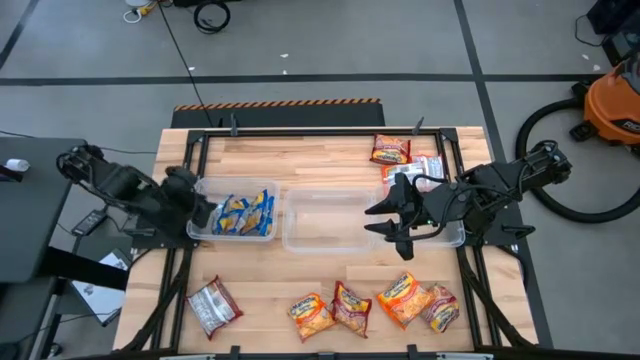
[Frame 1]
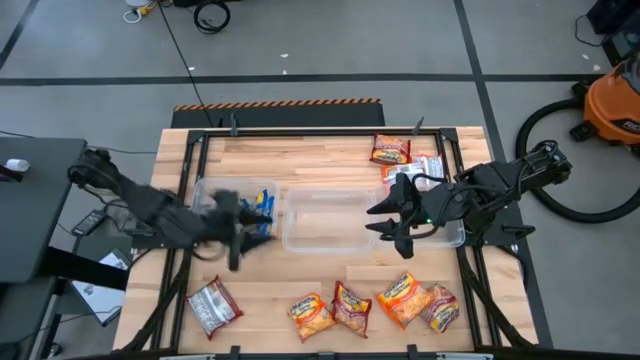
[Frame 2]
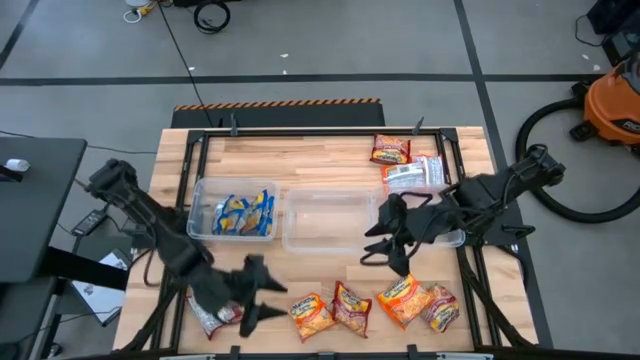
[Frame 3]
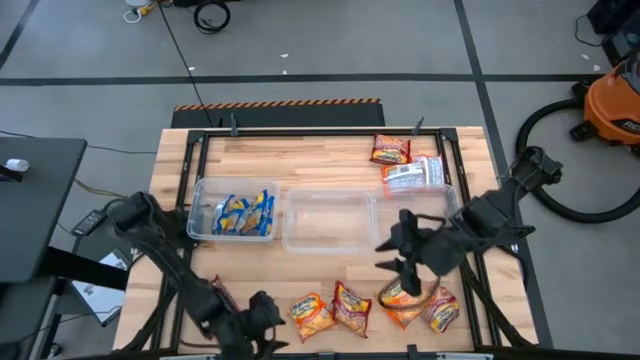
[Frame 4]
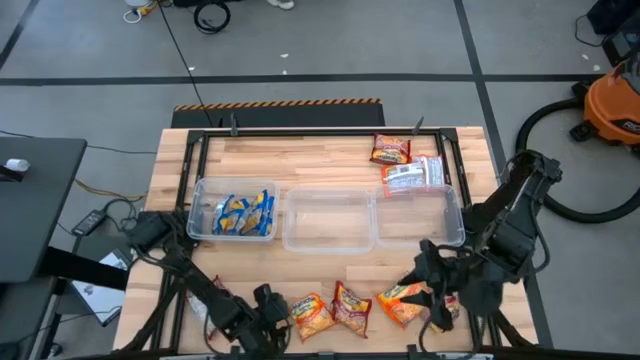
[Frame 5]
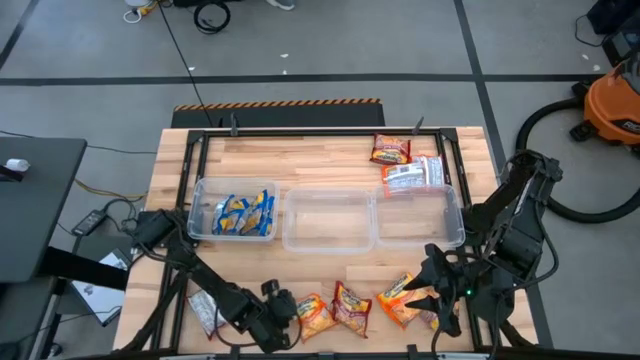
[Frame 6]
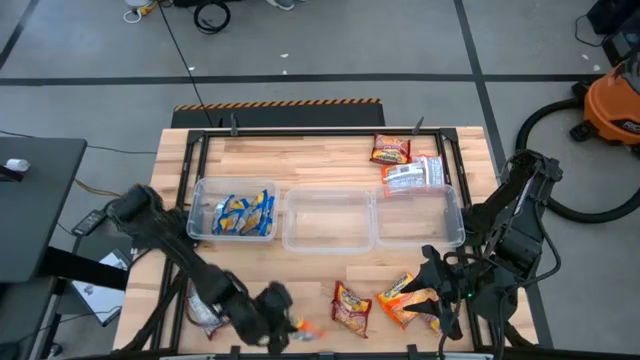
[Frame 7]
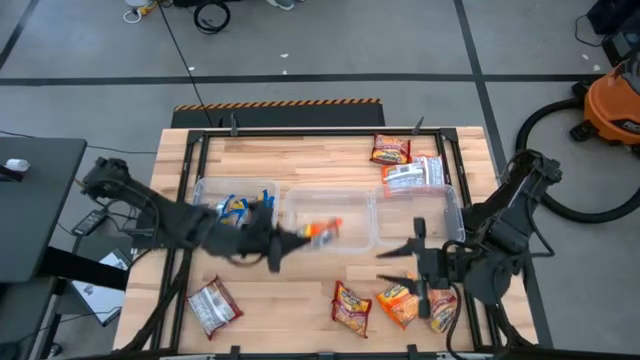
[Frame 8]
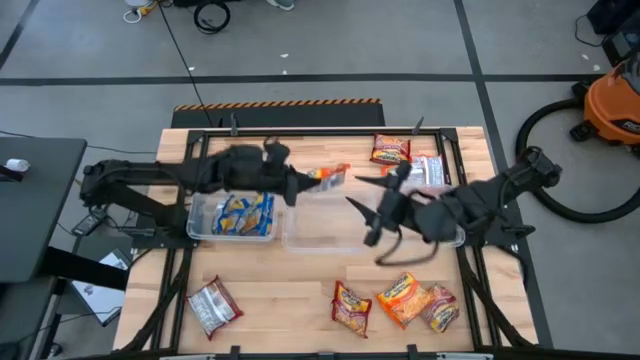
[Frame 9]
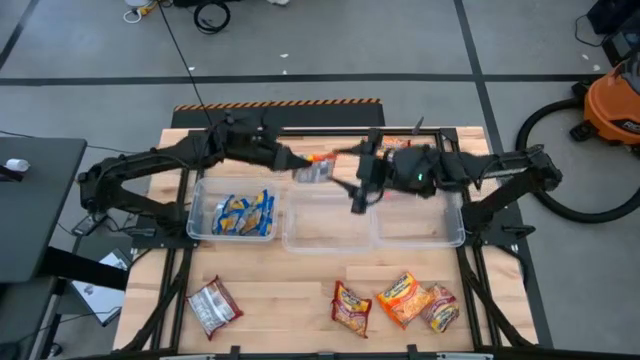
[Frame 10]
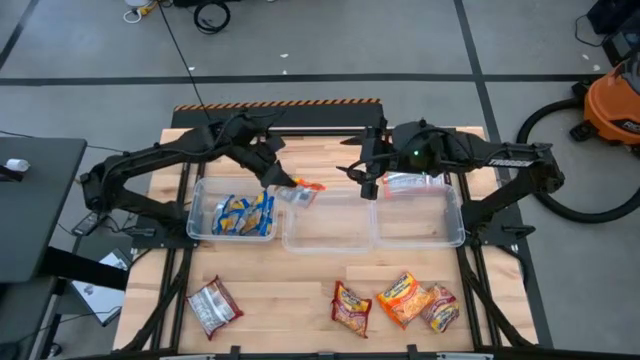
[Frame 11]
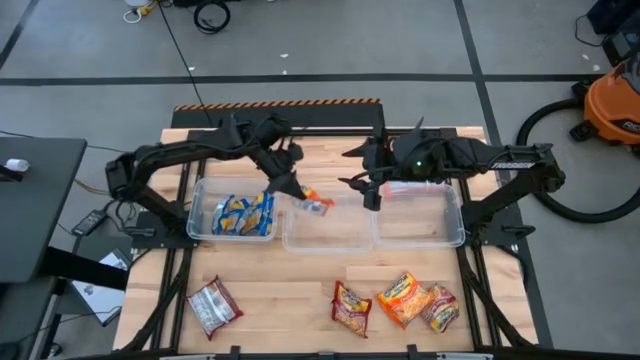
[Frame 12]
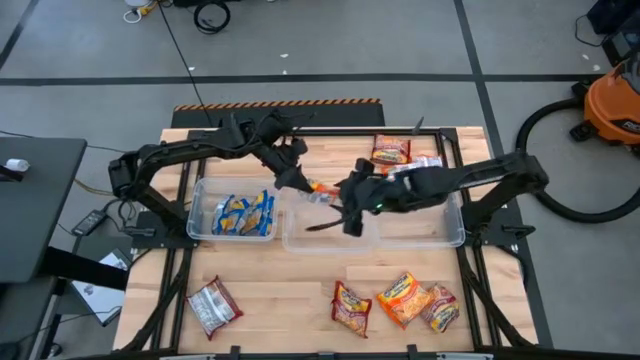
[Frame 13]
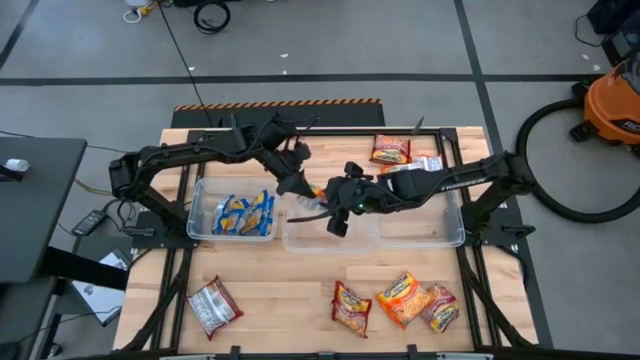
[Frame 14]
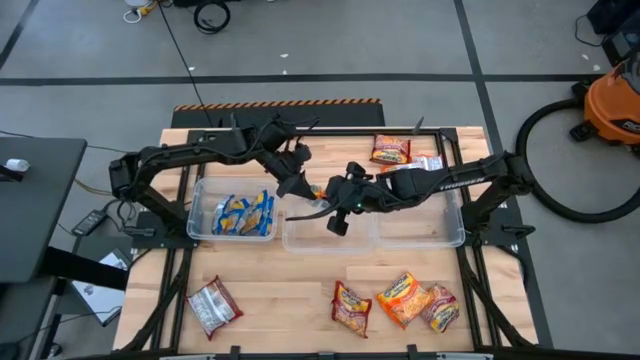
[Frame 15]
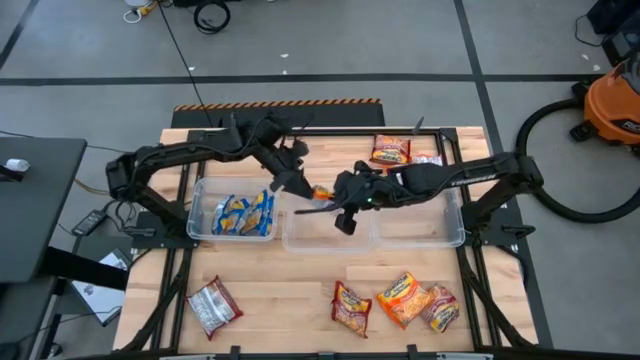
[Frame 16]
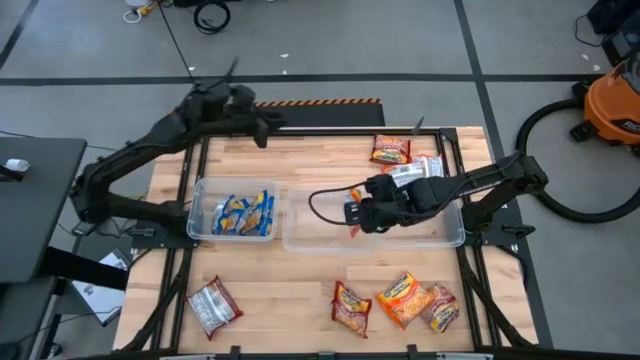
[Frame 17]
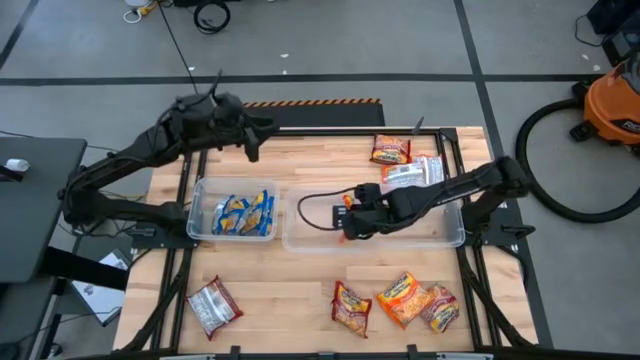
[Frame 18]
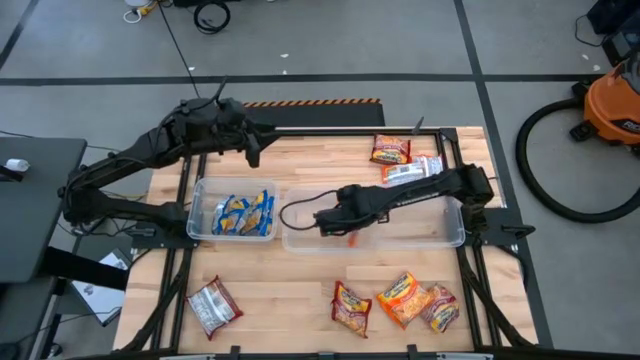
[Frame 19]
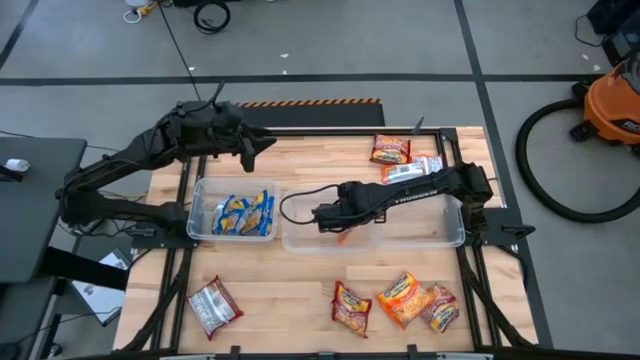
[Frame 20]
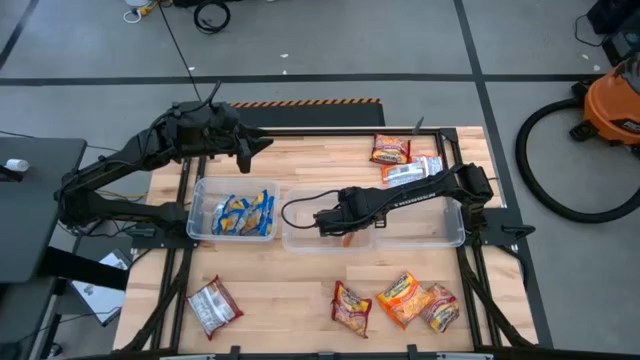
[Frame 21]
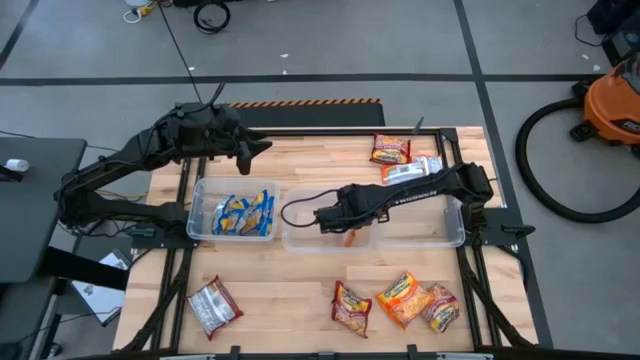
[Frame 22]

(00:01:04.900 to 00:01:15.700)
Task: Sort Maruchan noodles
Put the orange noodle pack into the middle transparent bin

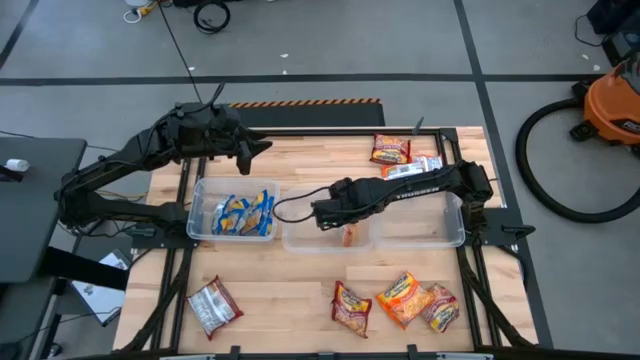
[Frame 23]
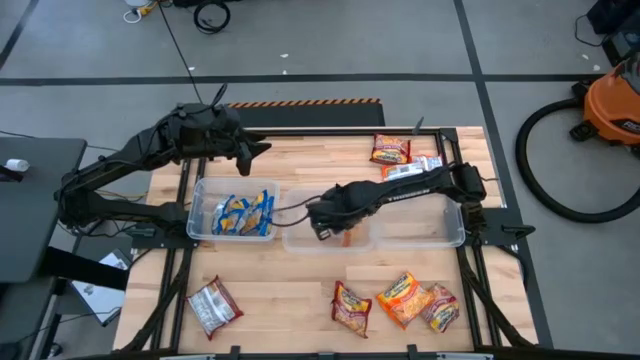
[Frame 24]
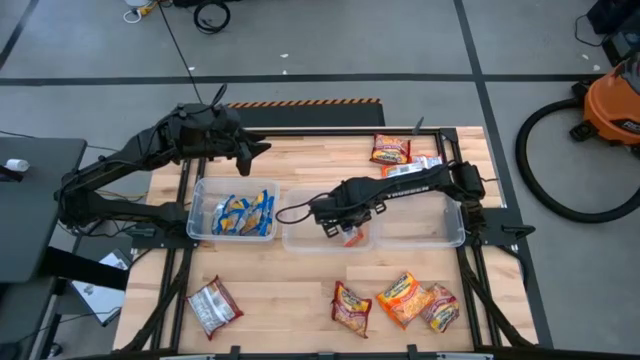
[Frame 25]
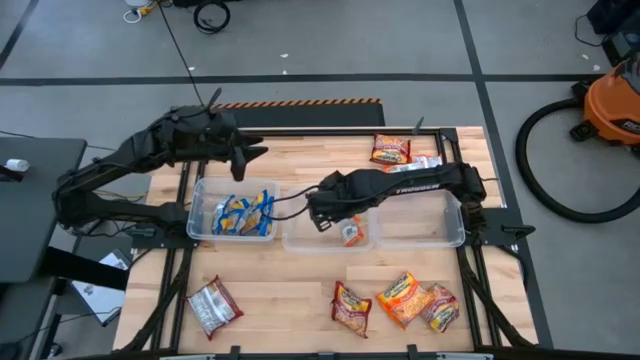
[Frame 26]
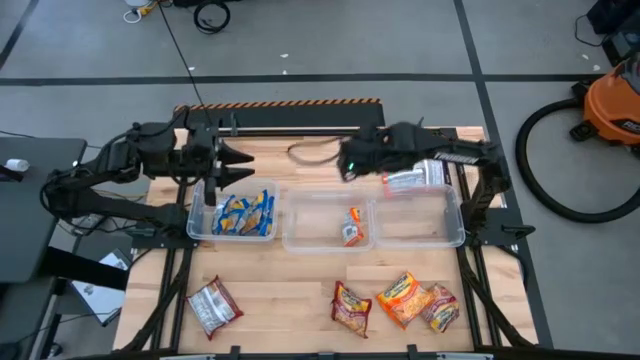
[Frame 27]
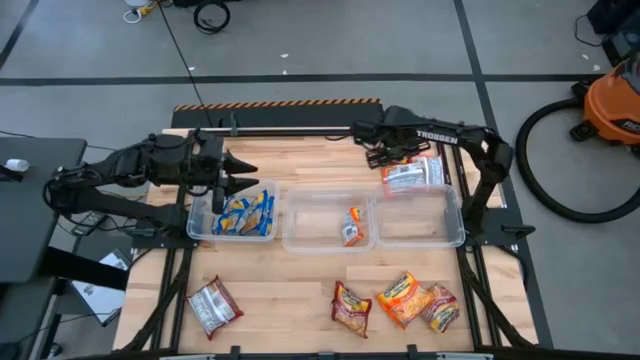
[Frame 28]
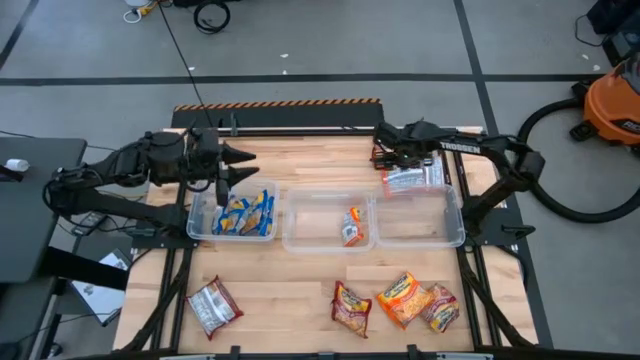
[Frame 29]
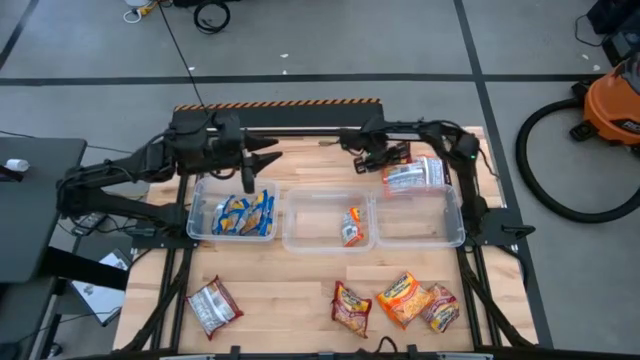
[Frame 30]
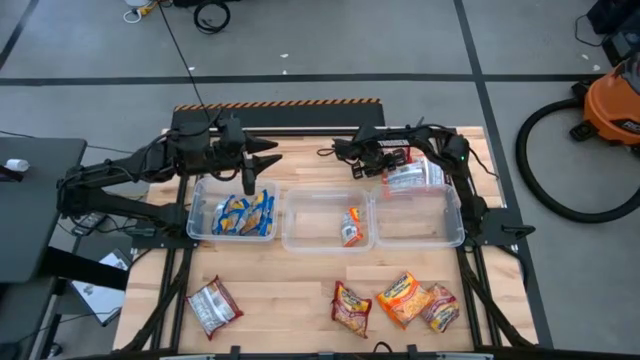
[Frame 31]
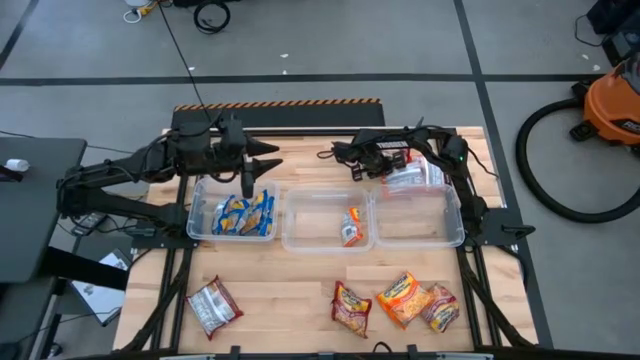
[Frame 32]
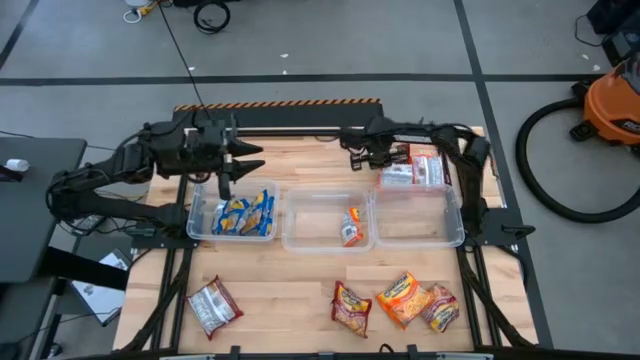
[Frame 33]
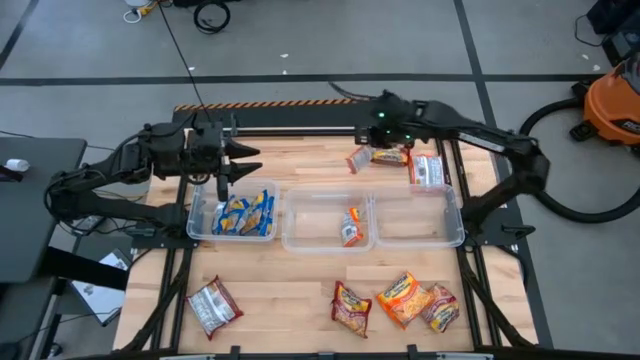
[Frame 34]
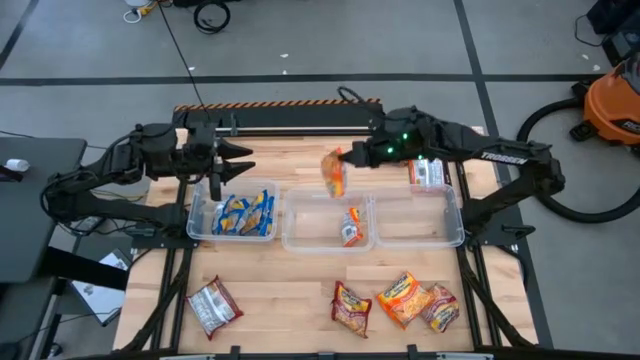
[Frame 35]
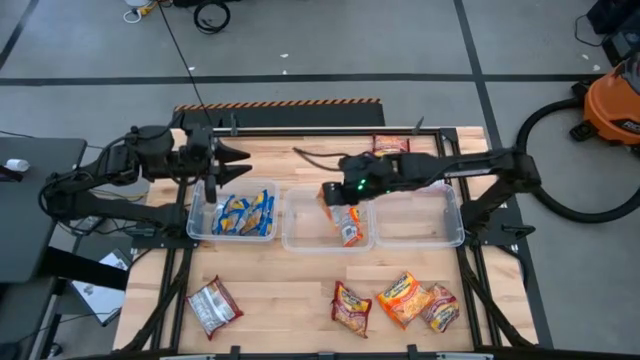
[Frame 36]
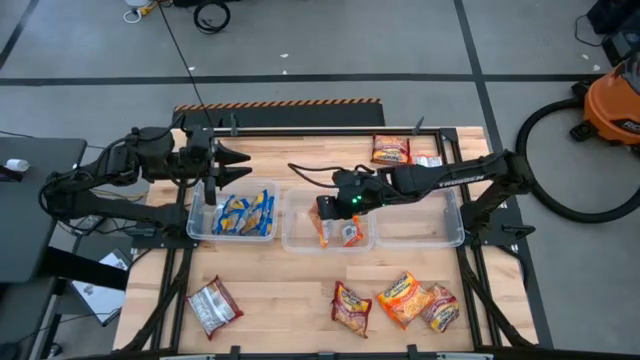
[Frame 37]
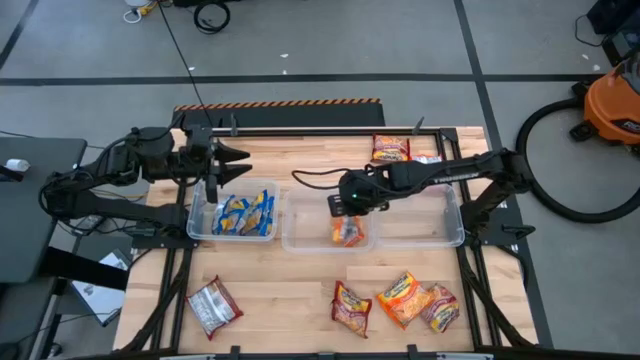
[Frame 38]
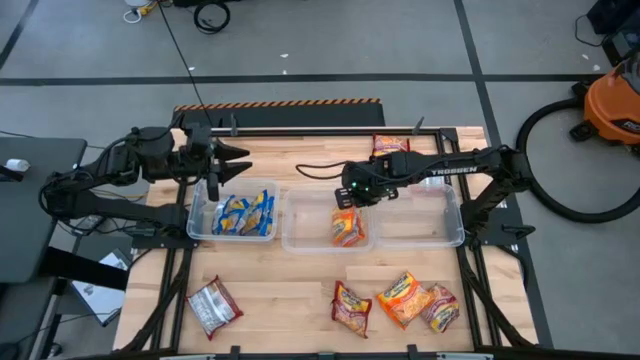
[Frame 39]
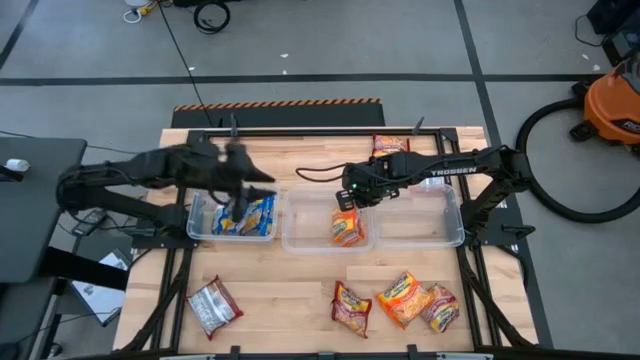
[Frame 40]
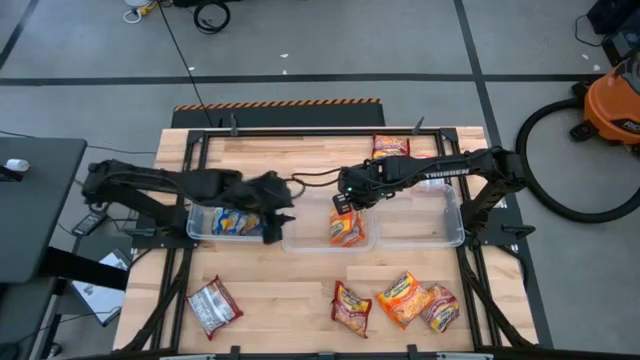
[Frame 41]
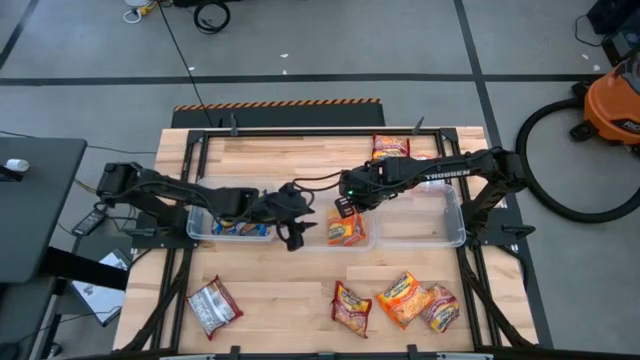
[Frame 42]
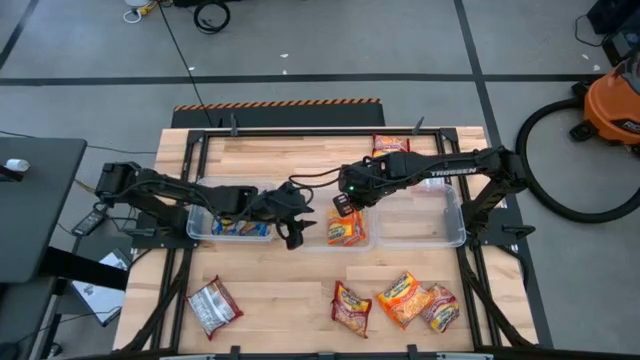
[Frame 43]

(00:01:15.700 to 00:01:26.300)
Put the orange noodle pack into the middle transparent bin

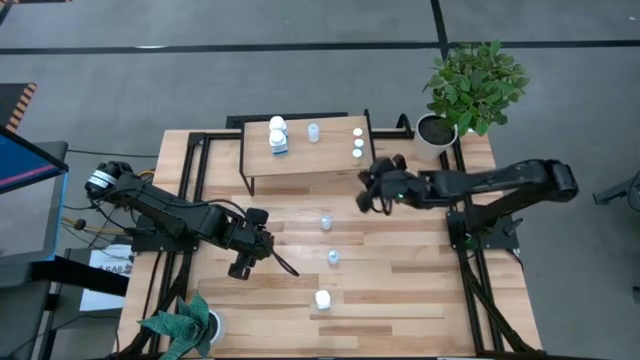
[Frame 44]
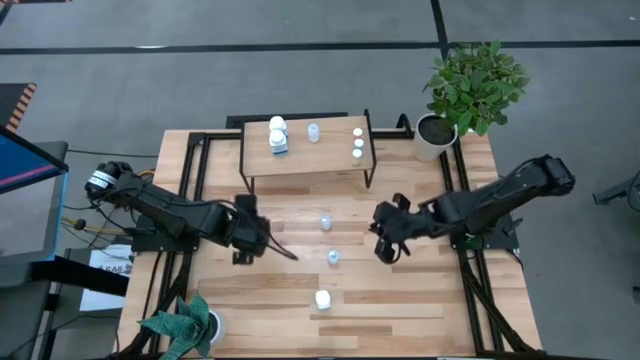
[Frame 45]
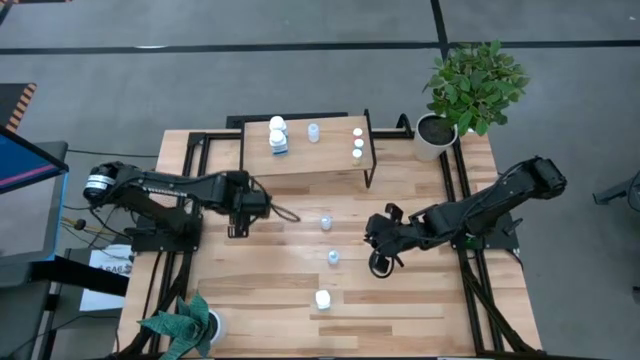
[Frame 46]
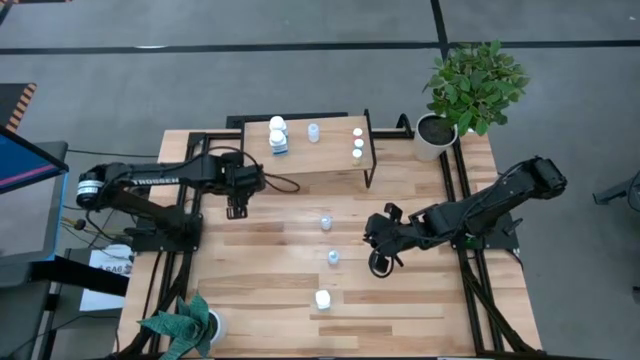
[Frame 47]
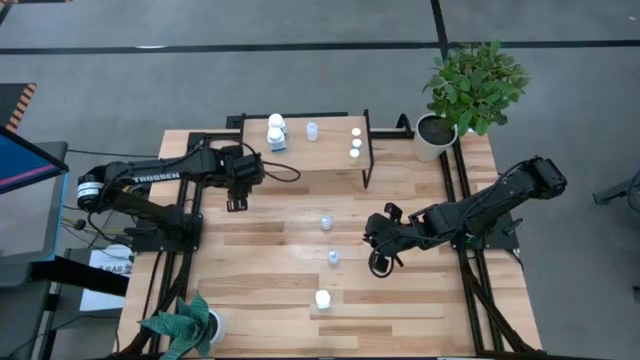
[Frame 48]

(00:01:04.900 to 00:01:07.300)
Task: Pick and place medicine bottles onto shelf by color
Adjust the shelf
